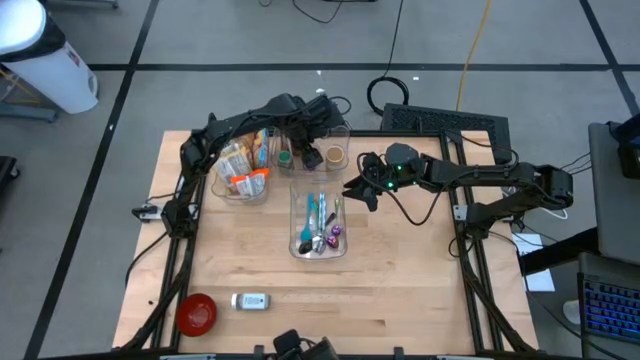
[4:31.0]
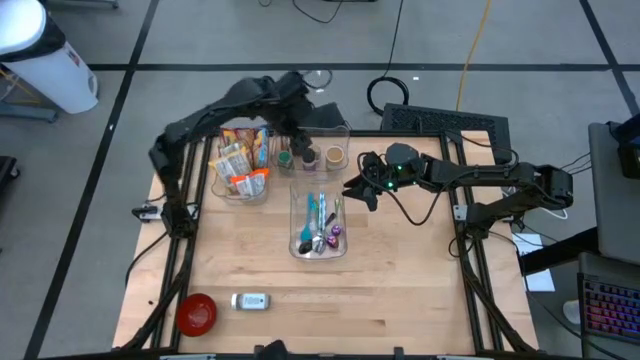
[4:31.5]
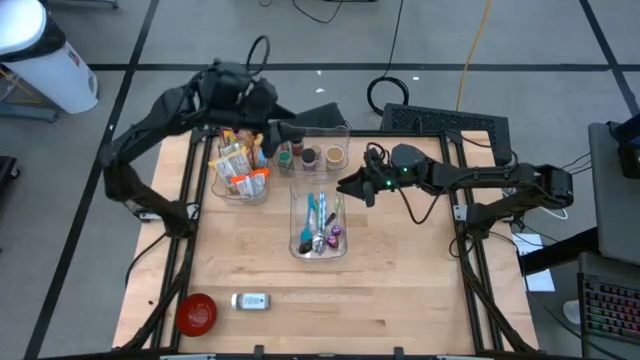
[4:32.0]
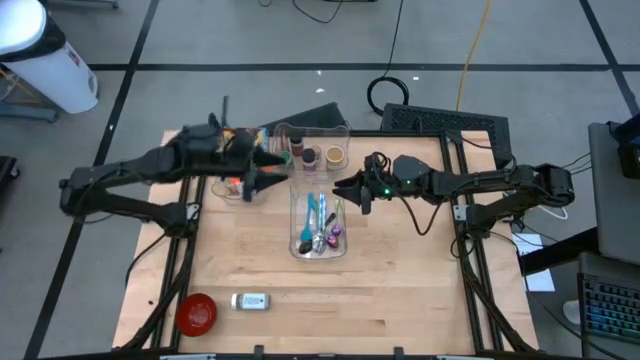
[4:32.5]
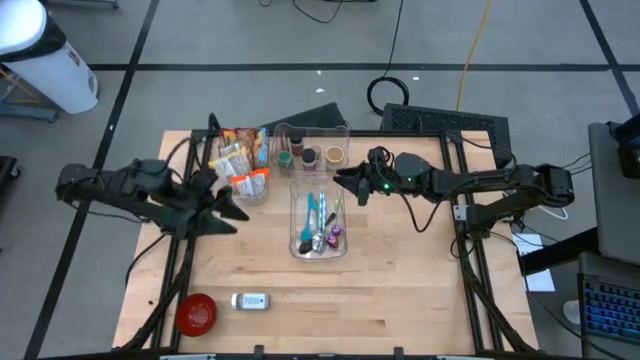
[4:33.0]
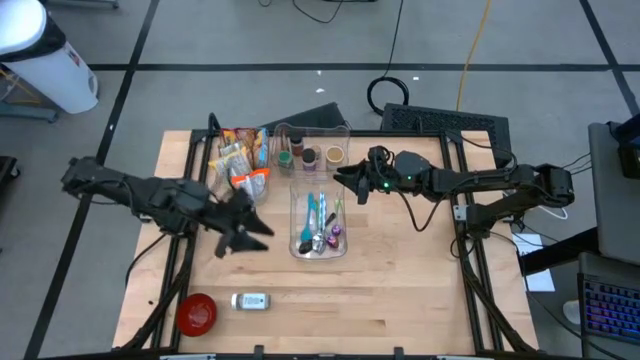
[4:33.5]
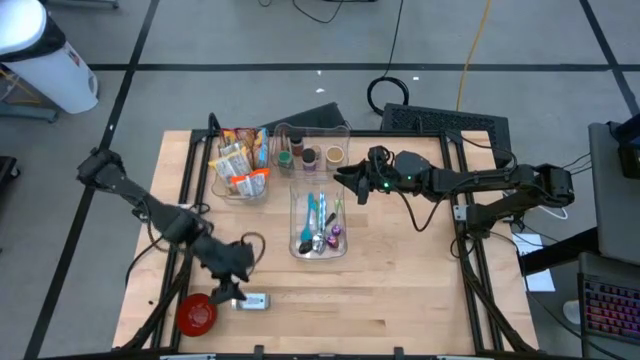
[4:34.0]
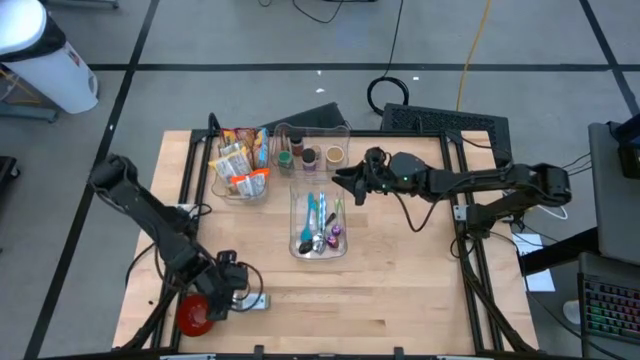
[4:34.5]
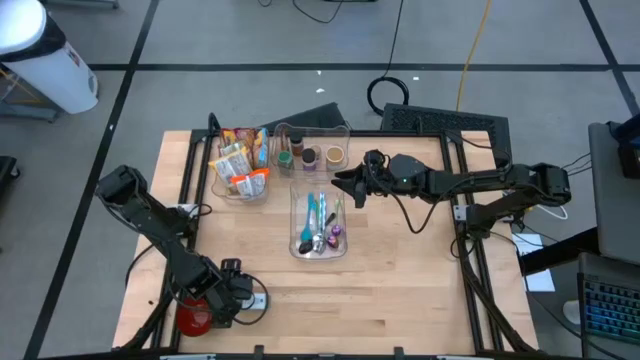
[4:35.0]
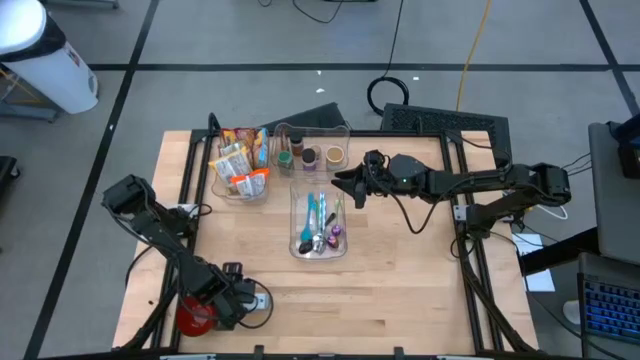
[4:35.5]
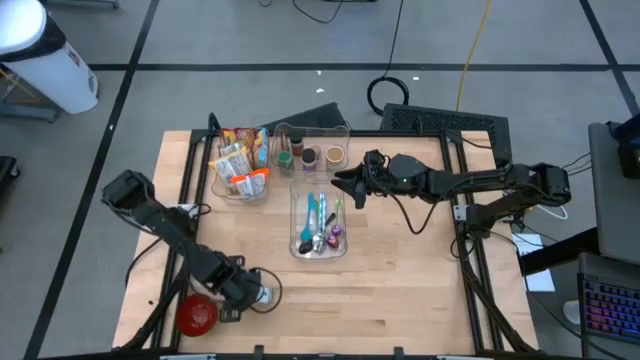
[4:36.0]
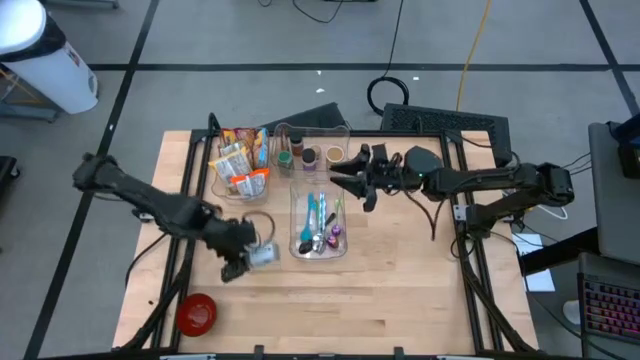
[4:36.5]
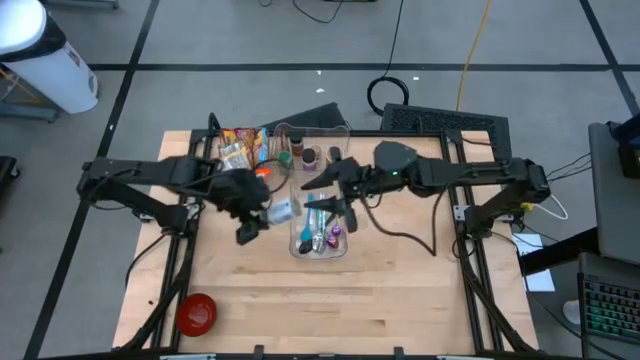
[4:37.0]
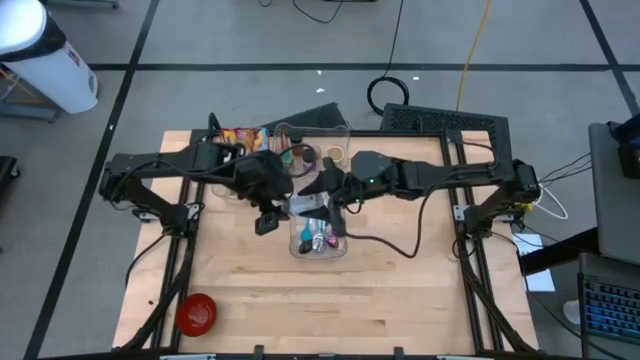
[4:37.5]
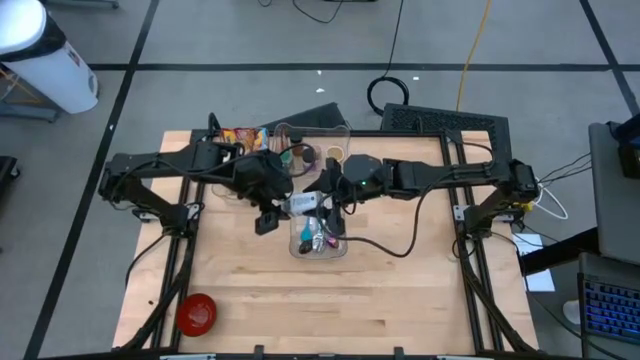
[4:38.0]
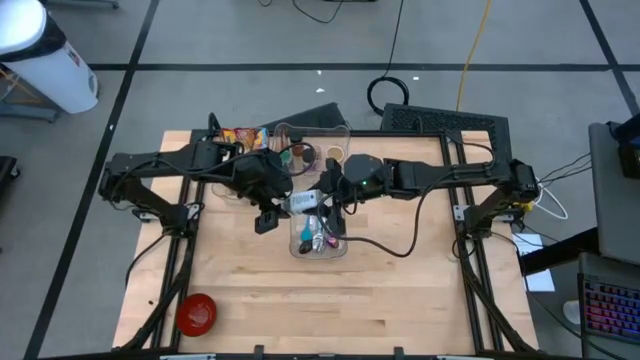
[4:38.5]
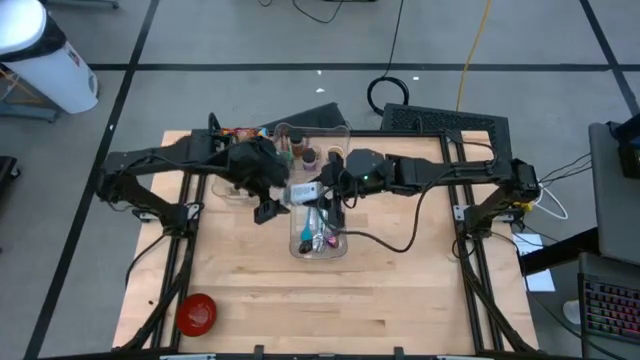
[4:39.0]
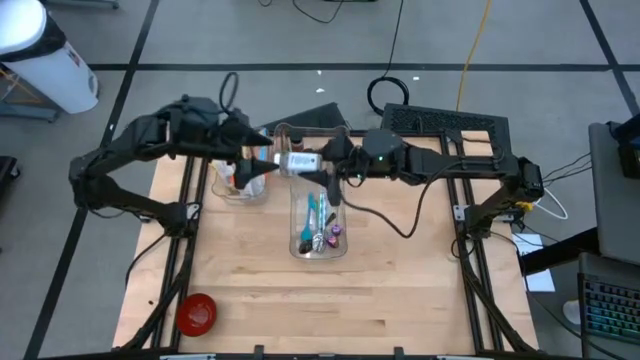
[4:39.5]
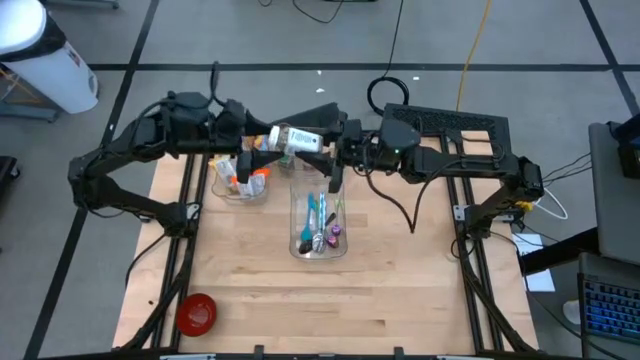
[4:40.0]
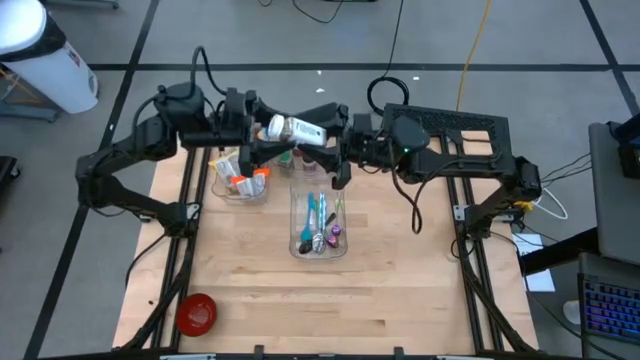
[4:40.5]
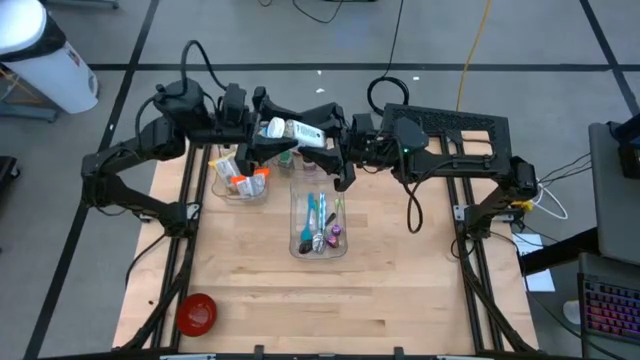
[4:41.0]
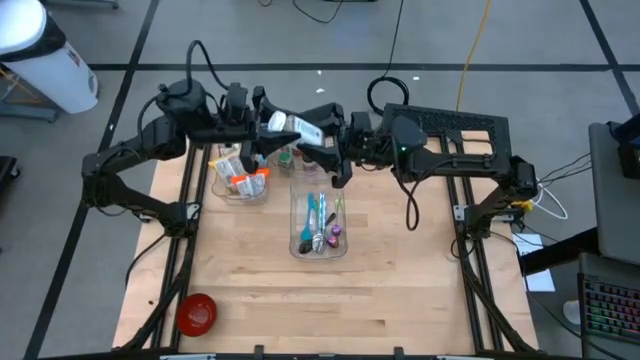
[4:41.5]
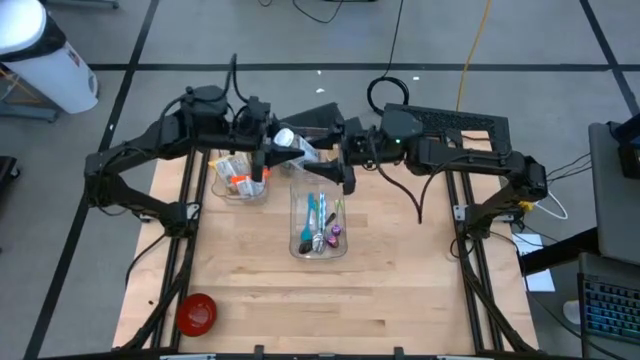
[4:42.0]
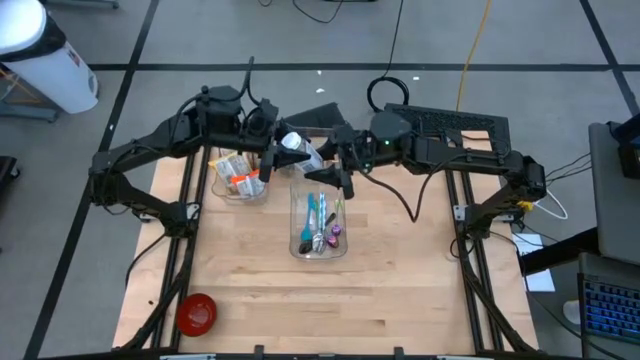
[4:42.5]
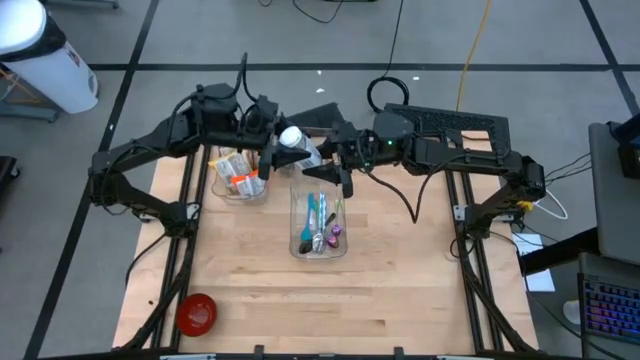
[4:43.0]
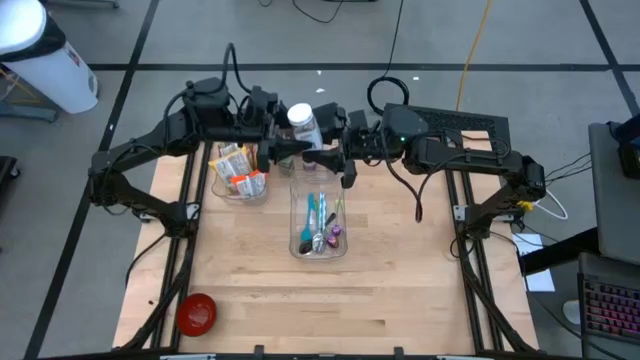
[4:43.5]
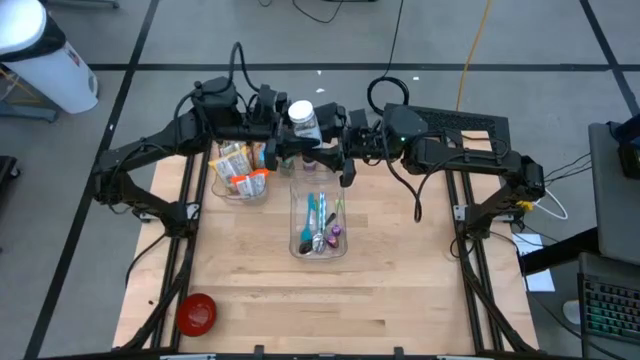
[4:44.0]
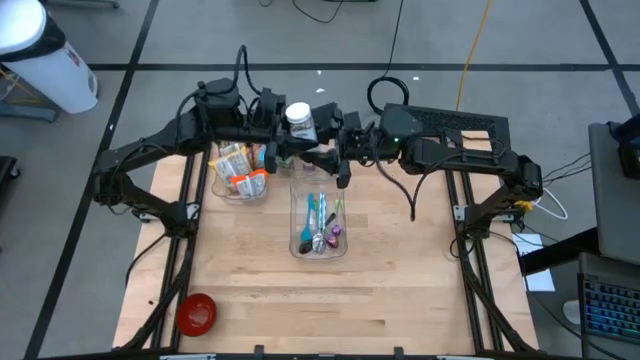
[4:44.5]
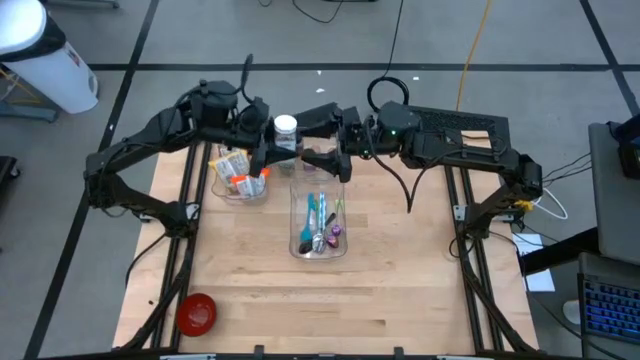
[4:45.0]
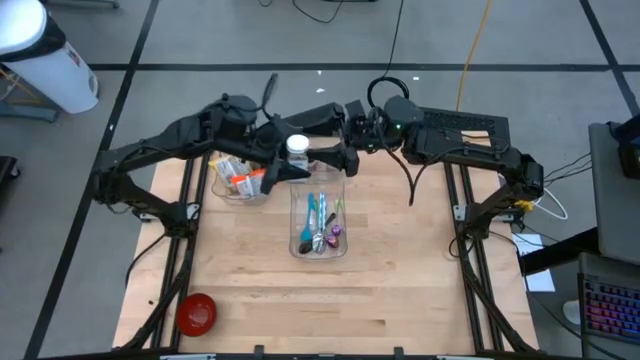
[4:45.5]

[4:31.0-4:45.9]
Task: Pick & Place Food Item
Put the white seasoning bottle into the top right transparent bin
